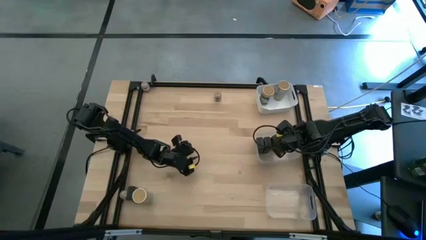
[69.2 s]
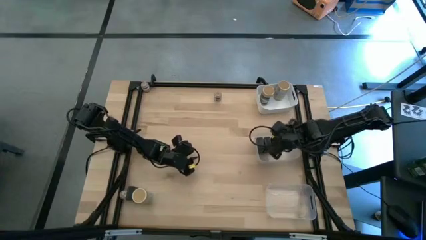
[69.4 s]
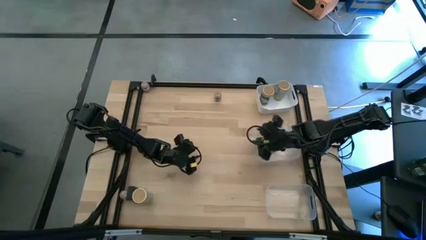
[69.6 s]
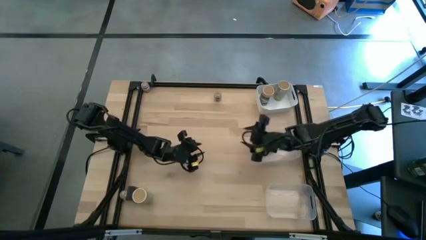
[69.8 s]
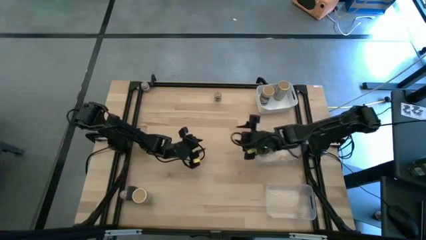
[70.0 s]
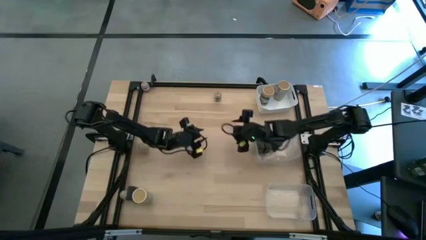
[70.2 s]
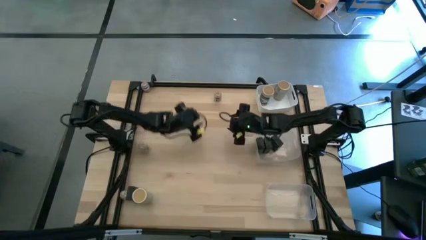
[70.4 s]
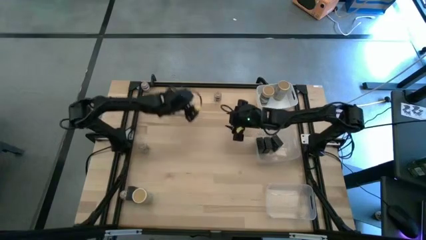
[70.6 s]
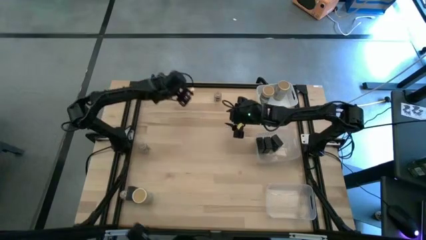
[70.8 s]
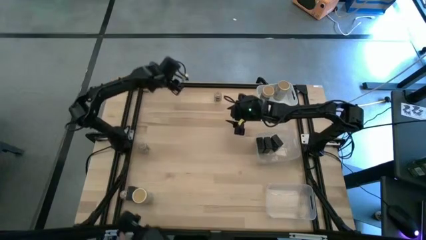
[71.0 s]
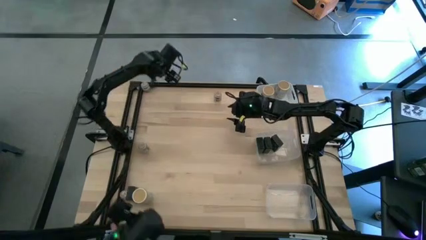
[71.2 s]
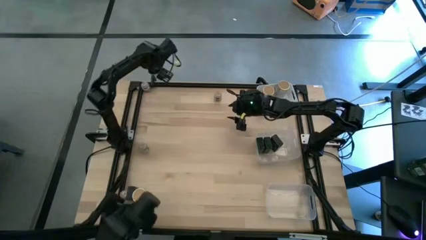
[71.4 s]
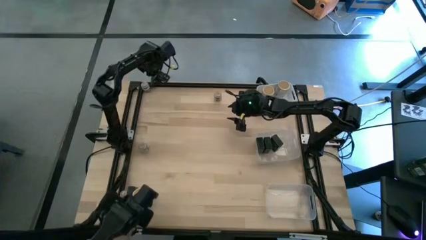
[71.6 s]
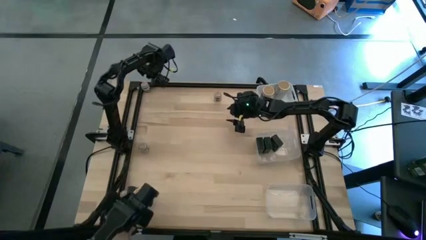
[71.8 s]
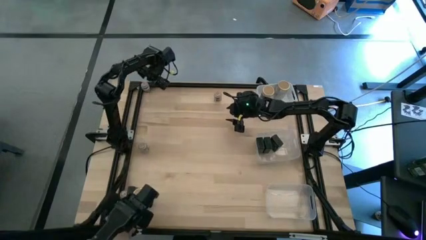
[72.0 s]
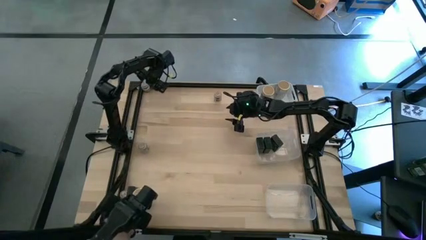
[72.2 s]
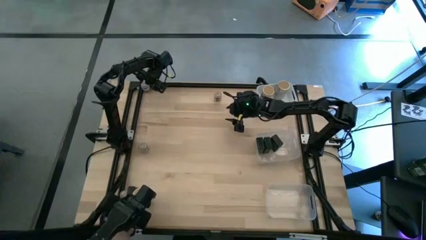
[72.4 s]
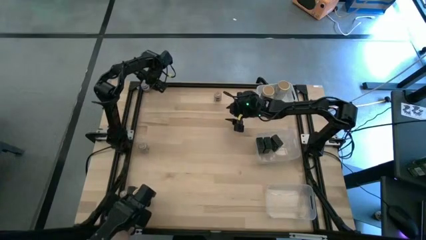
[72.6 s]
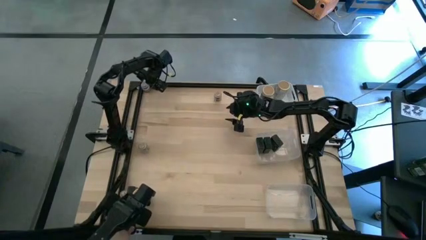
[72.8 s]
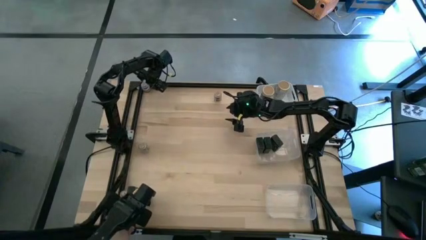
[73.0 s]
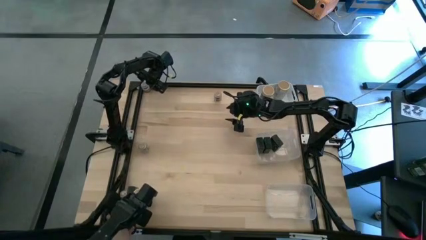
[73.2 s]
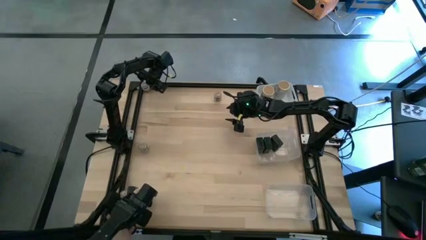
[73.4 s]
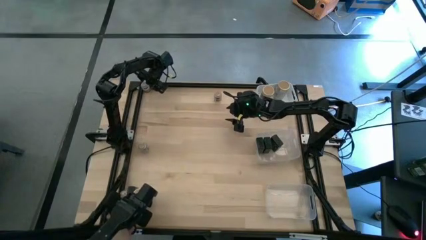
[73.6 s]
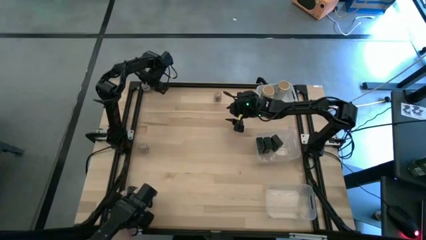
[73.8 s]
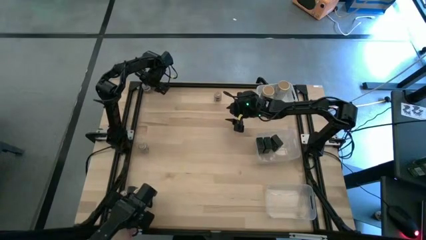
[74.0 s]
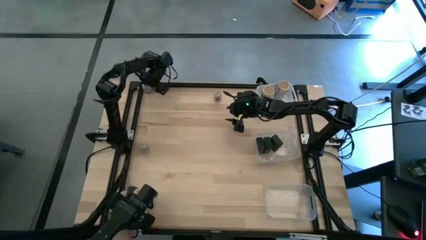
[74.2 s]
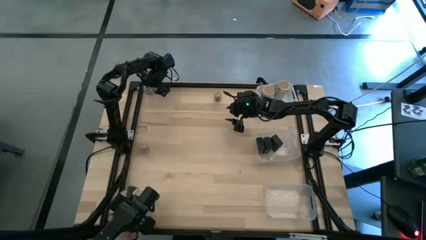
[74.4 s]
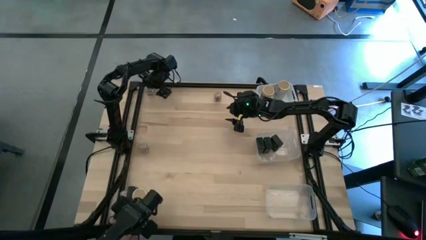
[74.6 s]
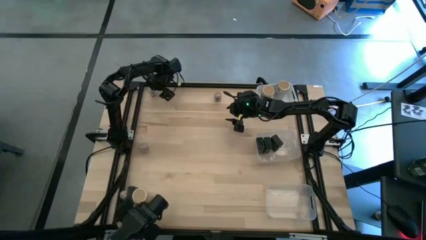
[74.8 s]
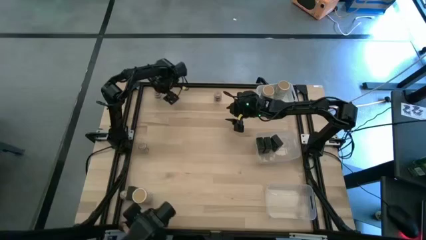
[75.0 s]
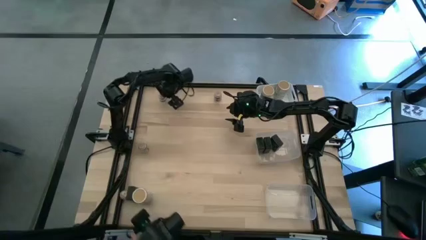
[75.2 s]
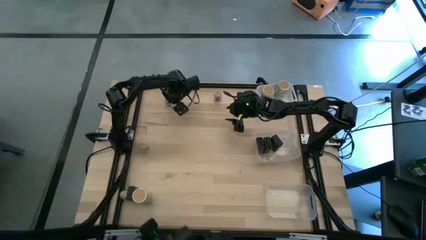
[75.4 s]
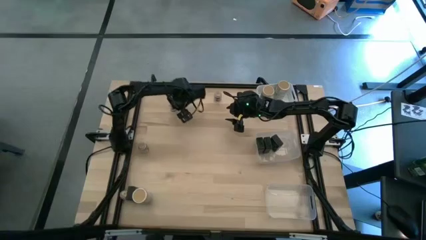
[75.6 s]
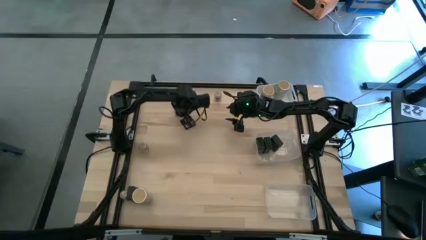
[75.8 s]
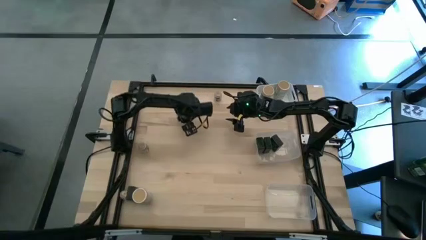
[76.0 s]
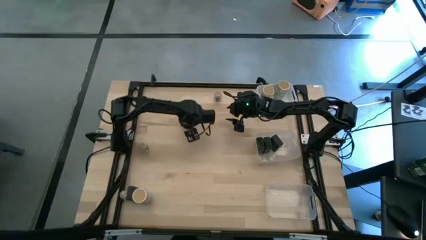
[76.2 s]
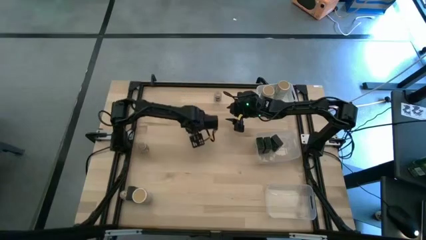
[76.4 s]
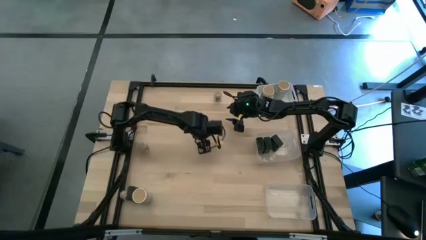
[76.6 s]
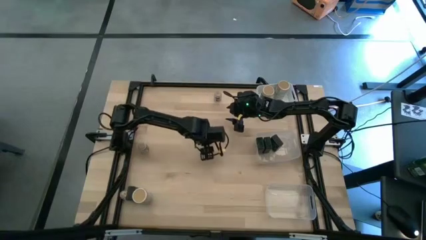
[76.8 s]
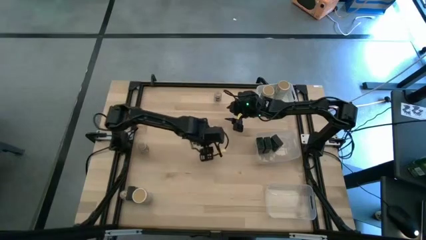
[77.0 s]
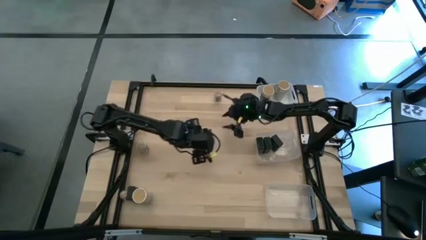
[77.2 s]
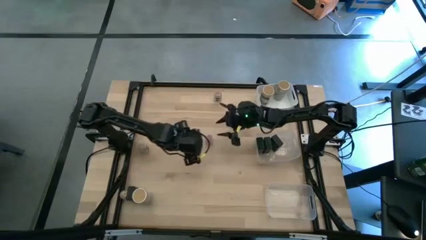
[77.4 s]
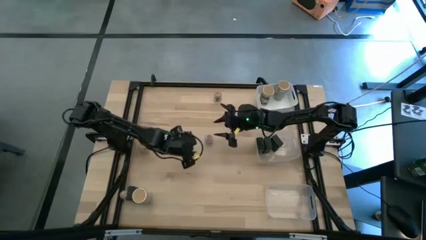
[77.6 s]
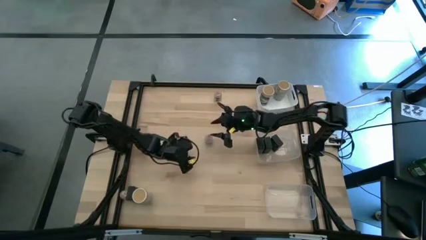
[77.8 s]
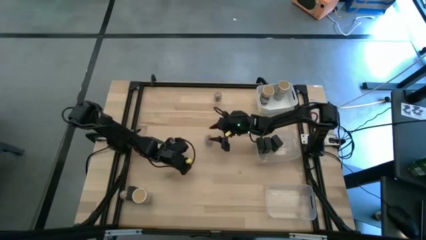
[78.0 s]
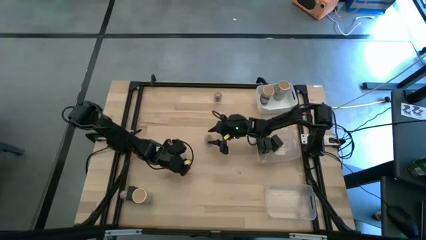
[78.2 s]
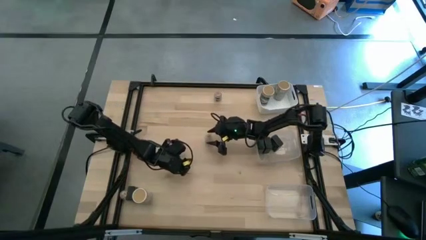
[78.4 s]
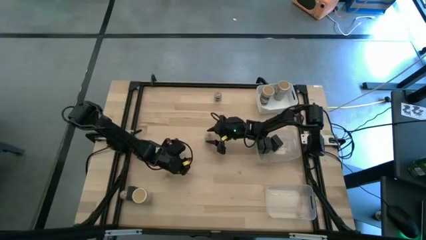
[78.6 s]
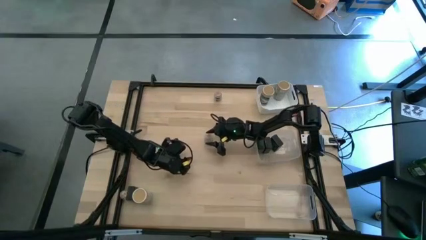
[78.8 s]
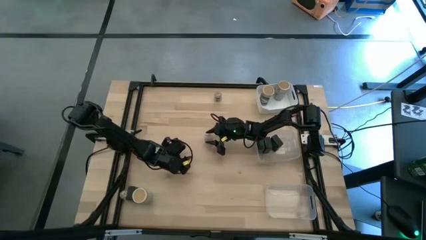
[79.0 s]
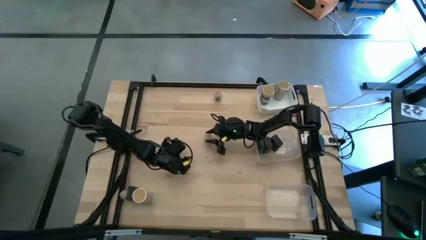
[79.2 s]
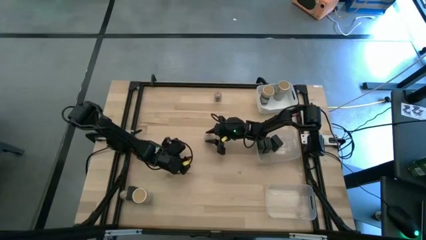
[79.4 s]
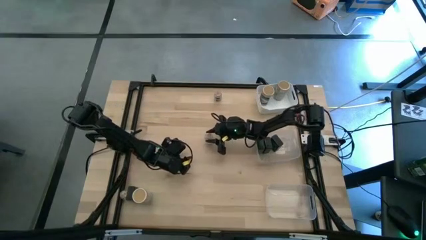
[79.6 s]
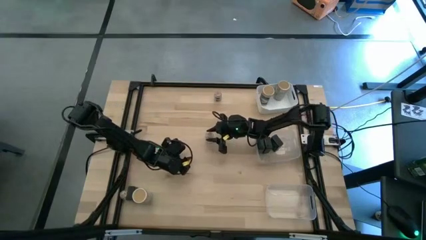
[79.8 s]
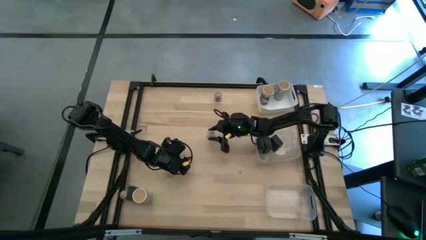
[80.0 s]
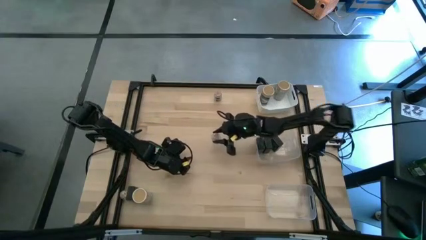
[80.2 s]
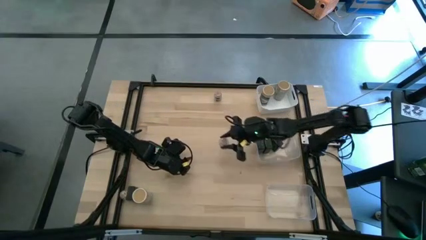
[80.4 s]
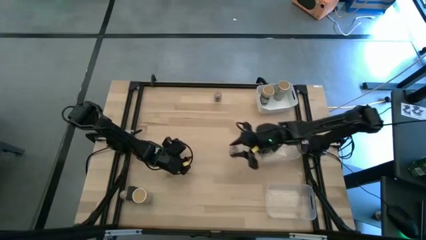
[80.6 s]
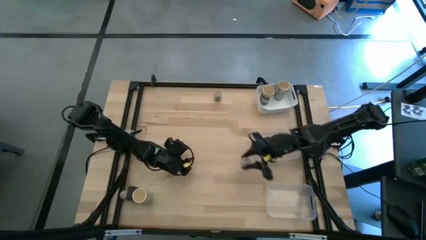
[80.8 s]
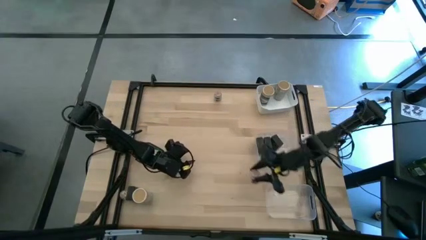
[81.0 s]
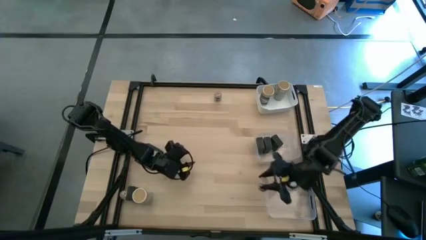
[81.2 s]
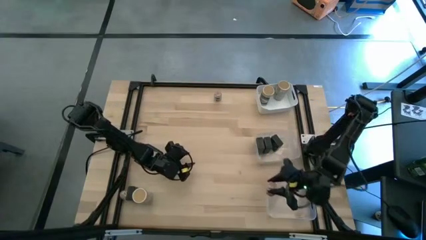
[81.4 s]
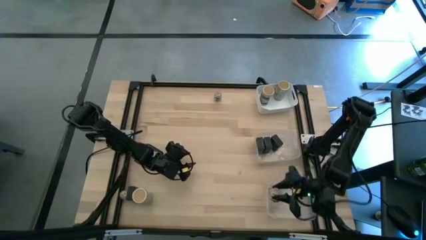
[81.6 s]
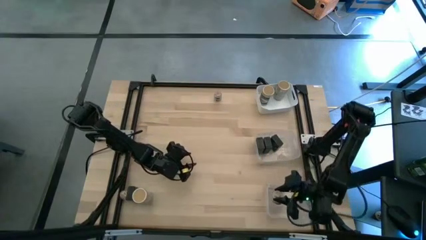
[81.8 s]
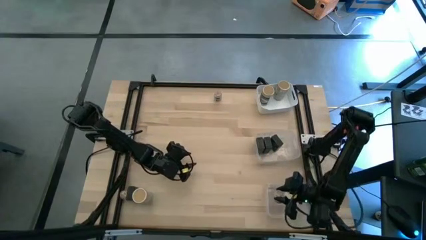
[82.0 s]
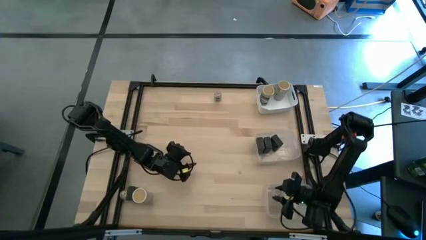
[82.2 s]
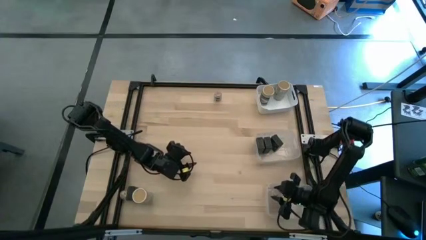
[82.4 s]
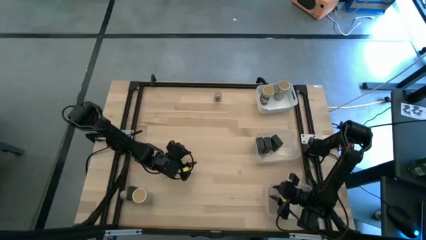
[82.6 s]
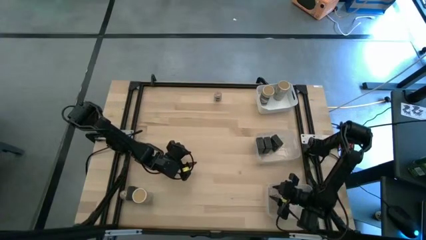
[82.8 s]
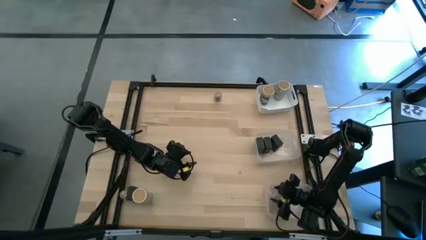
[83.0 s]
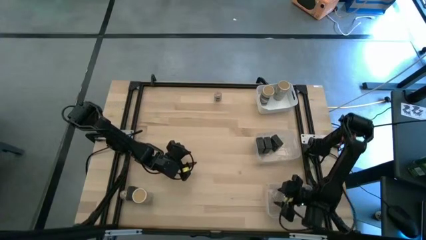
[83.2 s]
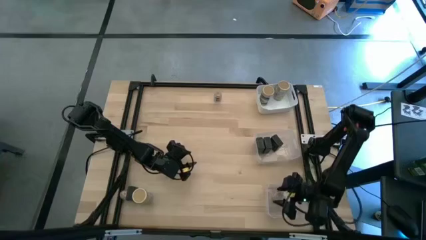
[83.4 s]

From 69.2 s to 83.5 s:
Task: Sort spices by type
Put the top left transparent seasoning bottle into the bottom transparent bin

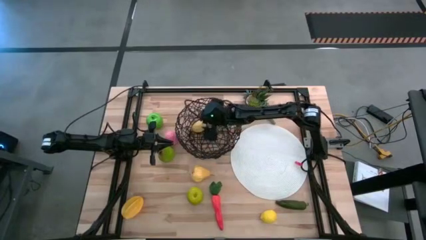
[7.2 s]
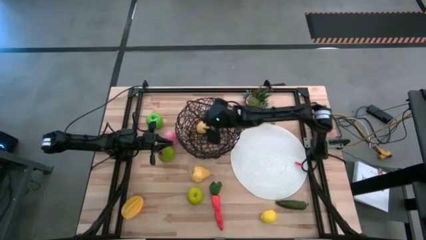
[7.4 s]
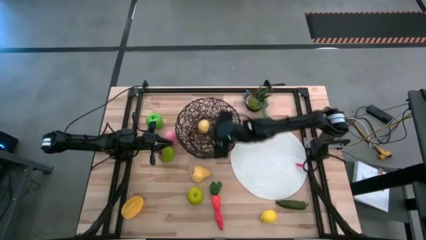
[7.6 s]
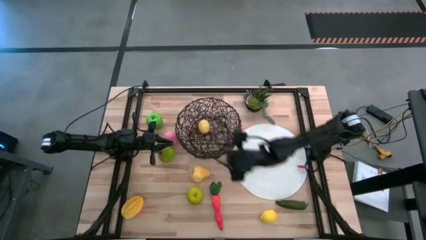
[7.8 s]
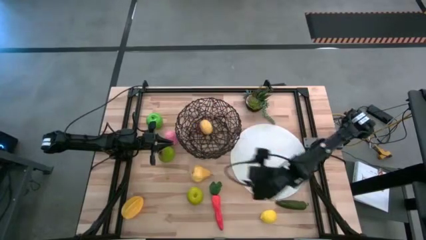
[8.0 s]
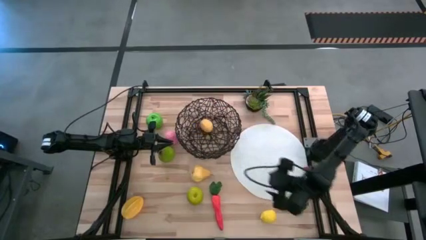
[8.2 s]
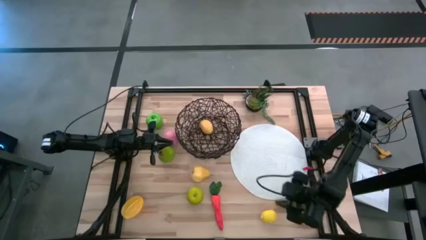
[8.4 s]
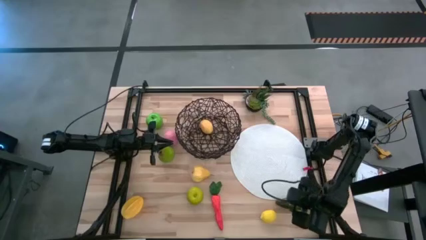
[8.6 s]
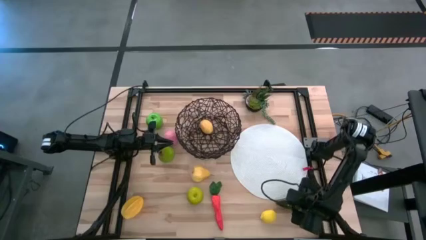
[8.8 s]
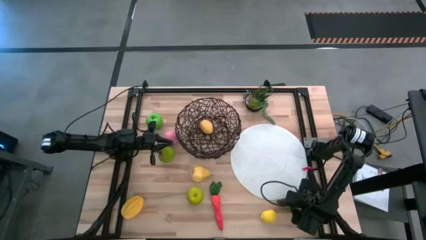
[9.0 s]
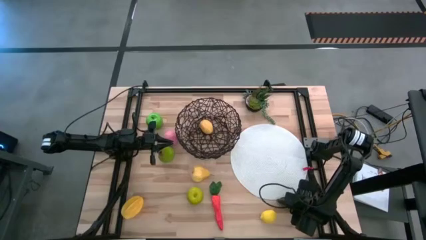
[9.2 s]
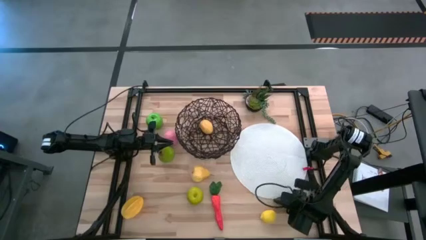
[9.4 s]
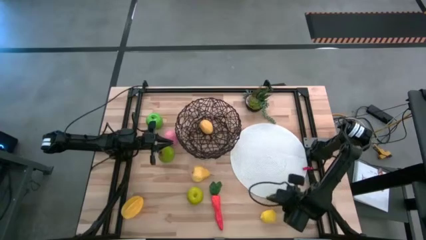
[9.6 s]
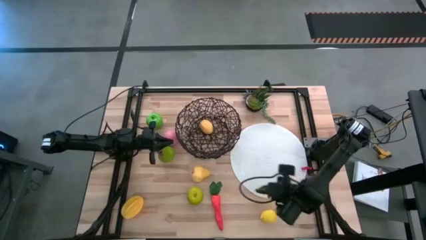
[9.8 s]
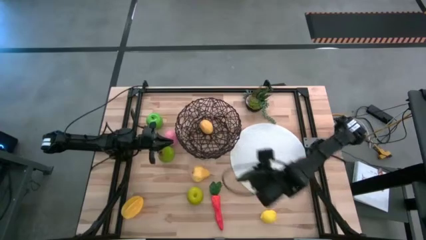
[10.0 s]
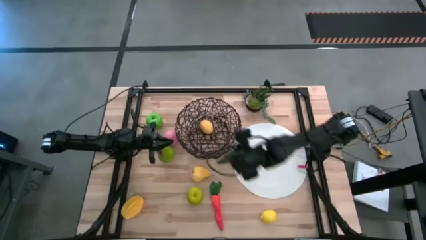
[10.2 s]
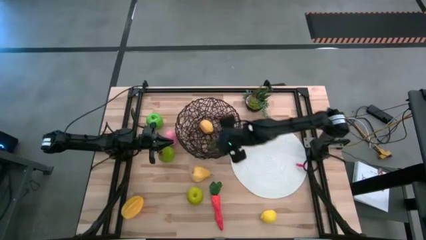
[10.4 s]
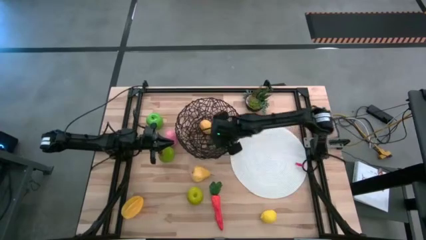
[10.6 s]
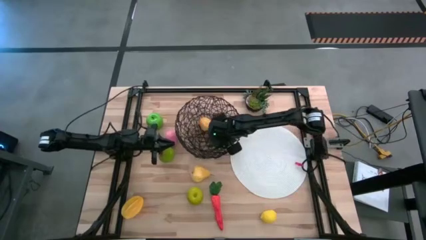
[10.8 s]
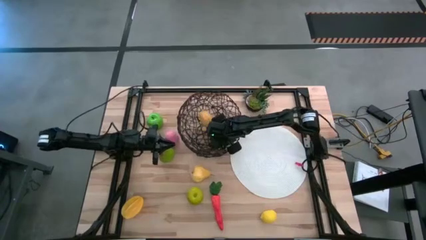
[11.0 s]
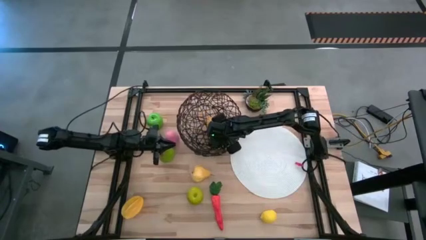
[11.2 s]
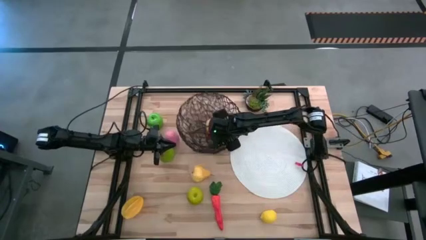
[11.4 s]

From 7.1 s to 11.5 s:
Task: Build produce basket
Put the cucumber into the wire basket
